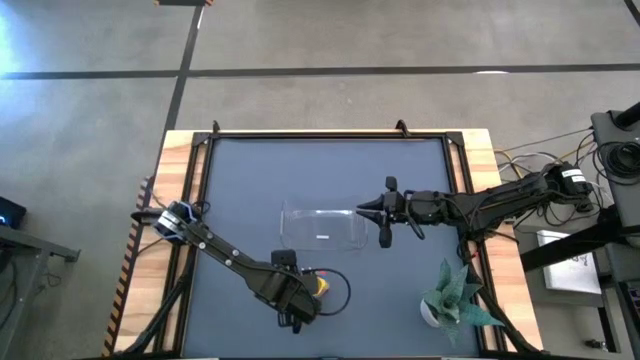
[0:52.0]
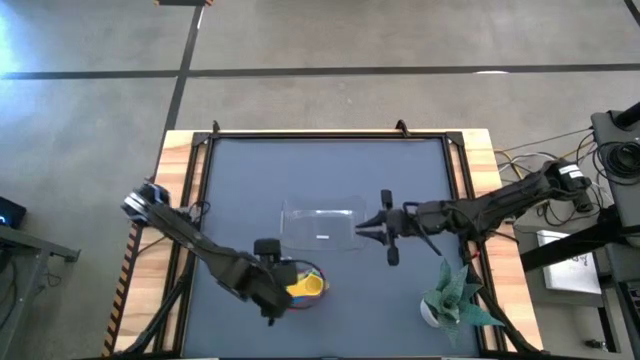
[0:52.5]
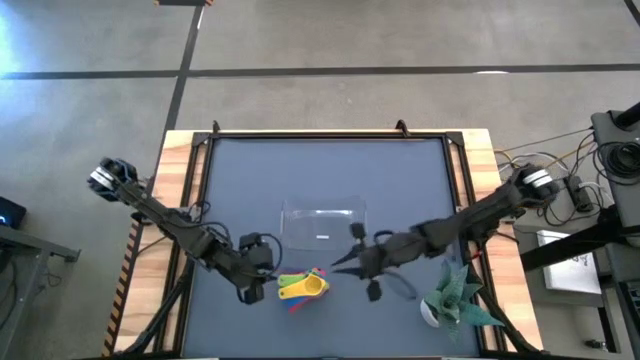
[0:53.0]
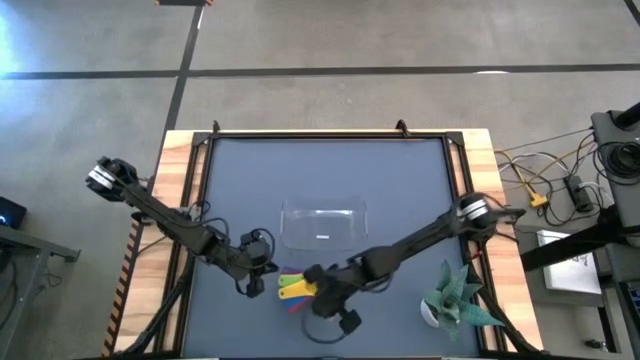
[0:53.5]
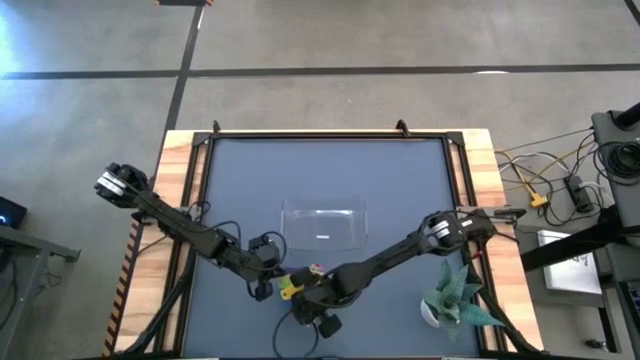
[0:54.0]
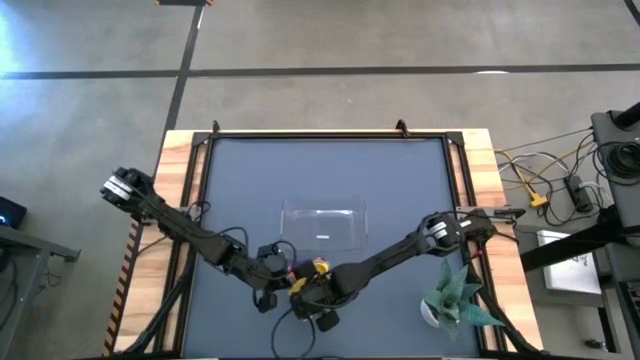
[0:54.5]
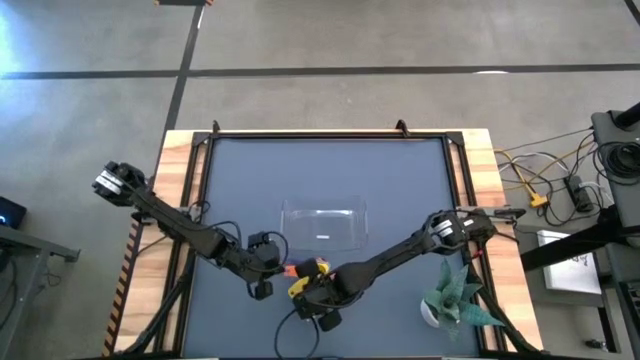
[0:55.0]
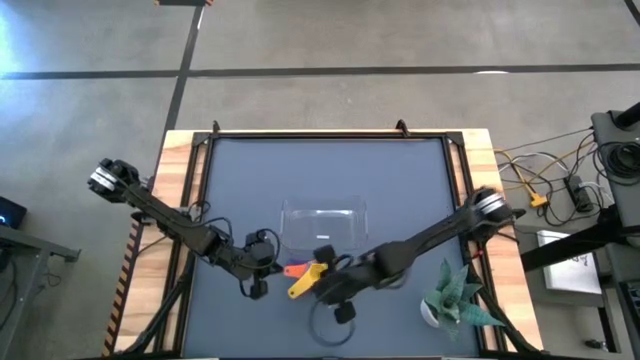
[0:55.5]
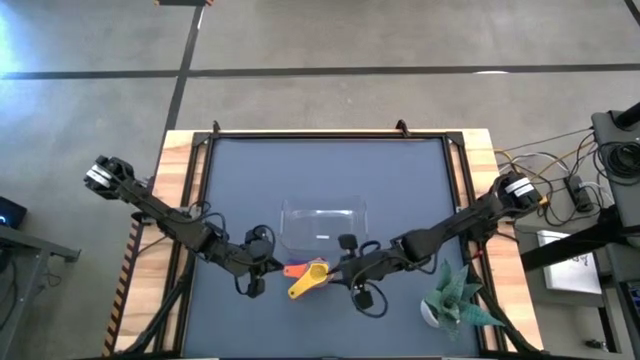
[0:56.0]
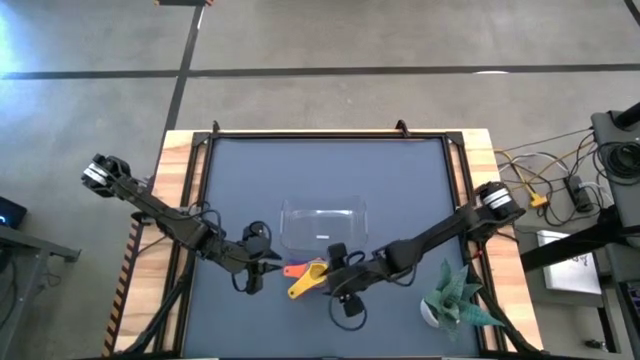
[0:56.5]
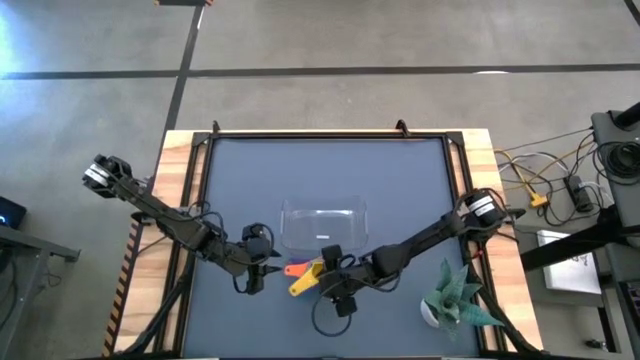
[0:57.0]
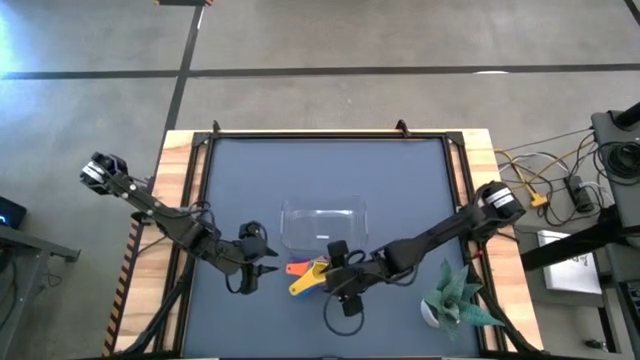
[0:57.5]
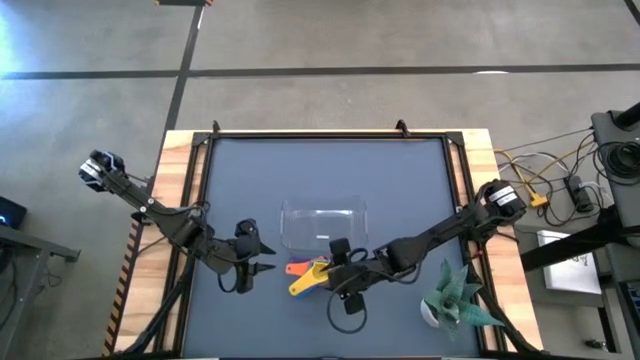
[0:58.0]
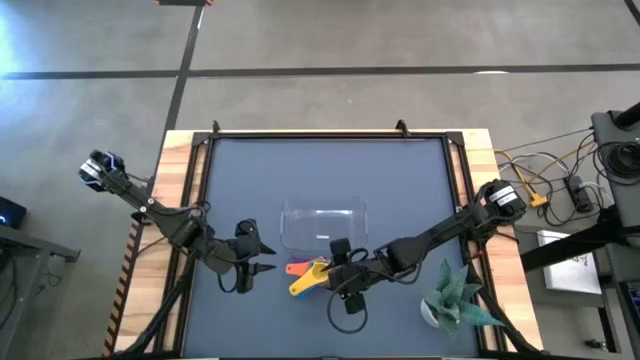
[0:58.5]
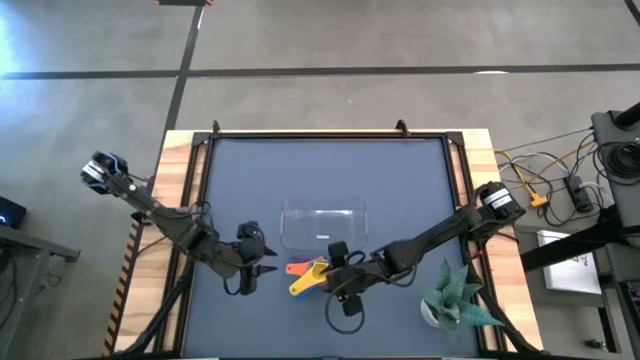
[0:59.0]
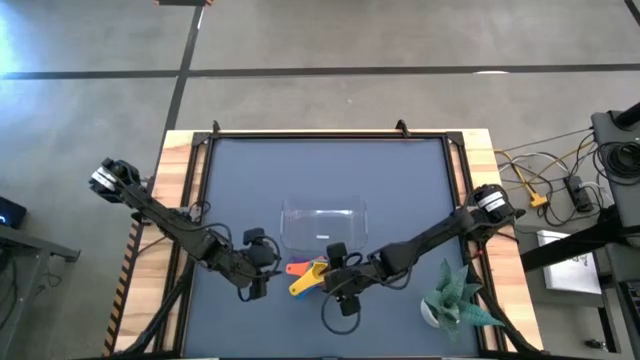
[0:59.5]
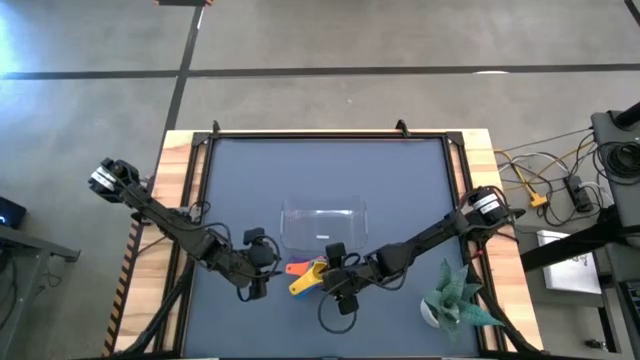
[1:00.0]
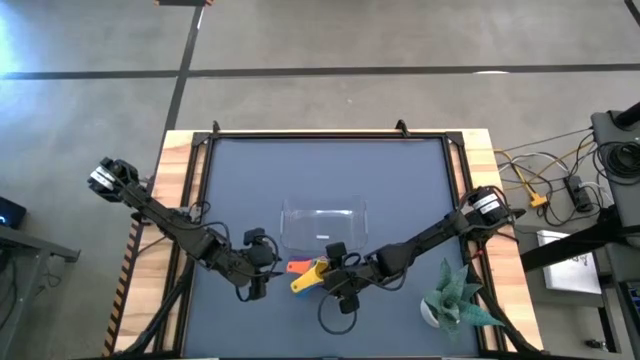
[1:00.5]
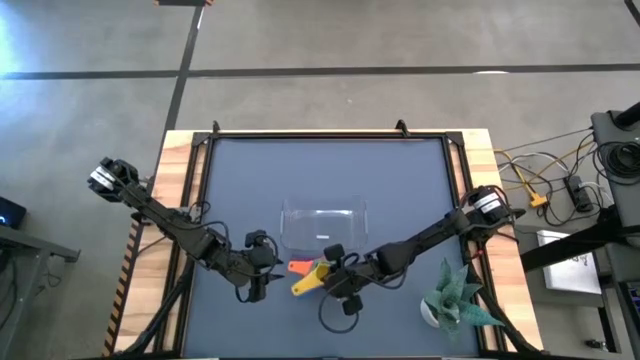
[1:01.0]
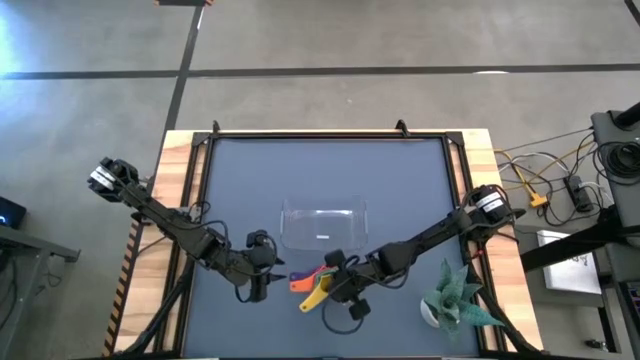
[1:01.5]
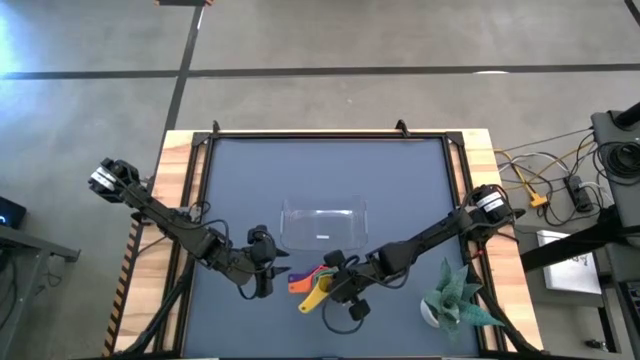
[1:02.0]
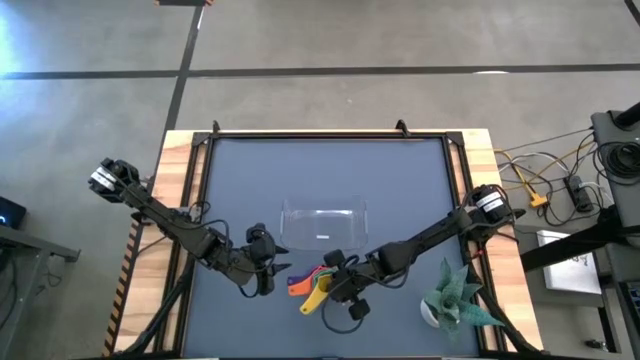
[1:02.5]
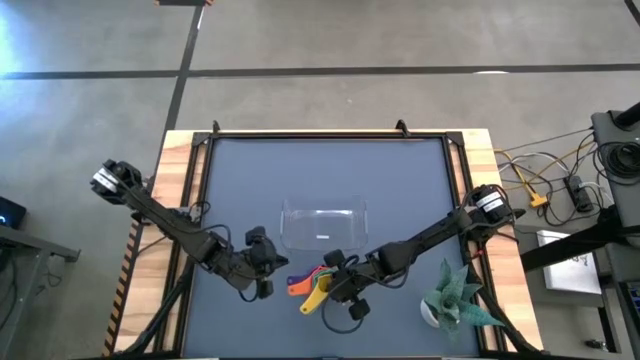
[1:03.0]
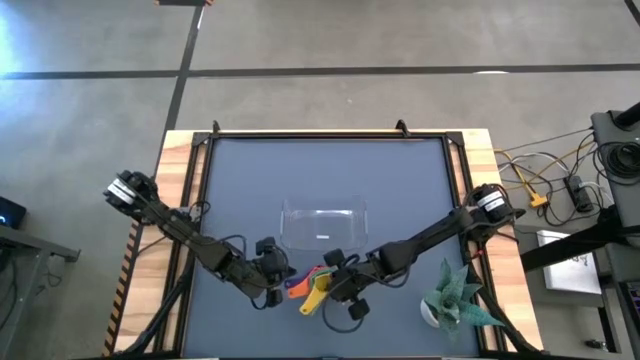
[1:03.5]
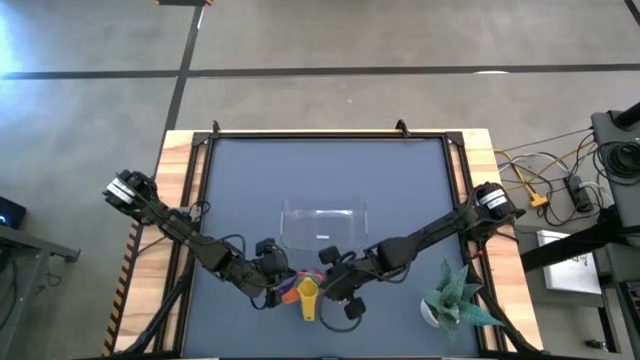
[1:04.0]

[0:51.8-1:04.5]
Task: Nest measuring cups in basket
Adjust the nested measuring cups

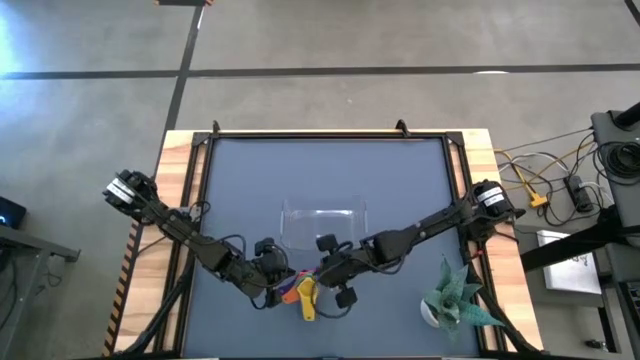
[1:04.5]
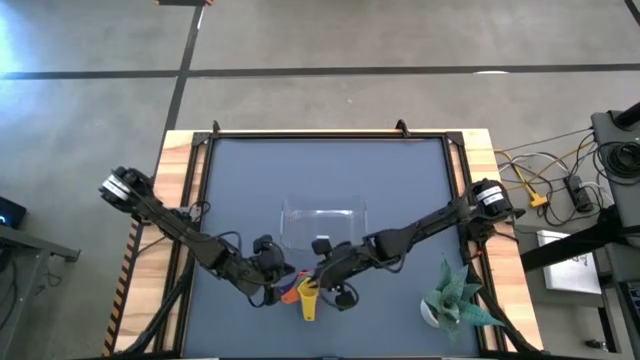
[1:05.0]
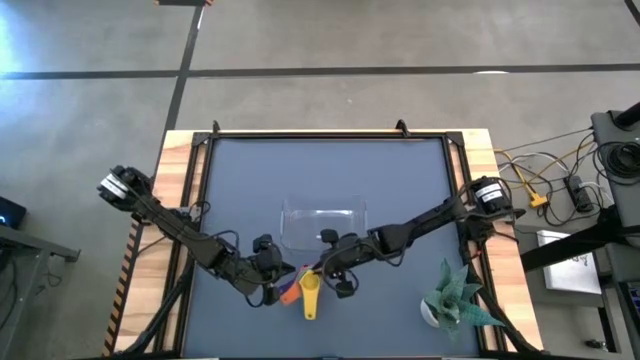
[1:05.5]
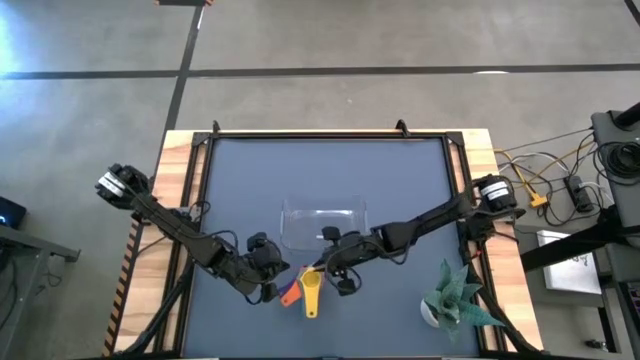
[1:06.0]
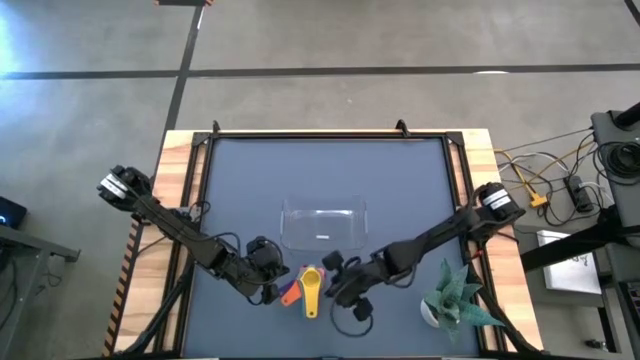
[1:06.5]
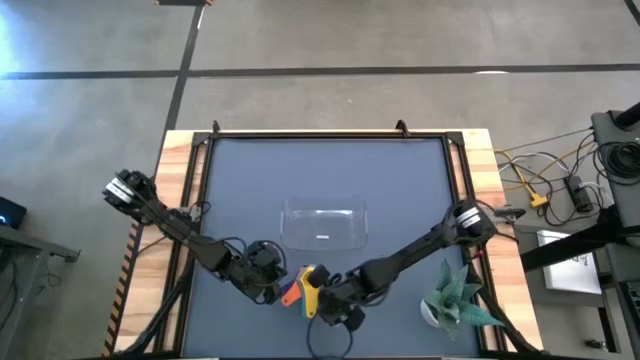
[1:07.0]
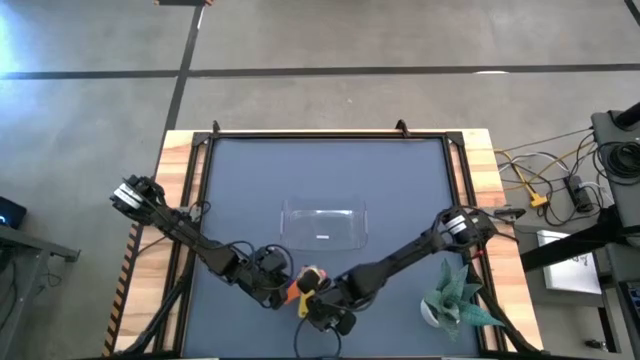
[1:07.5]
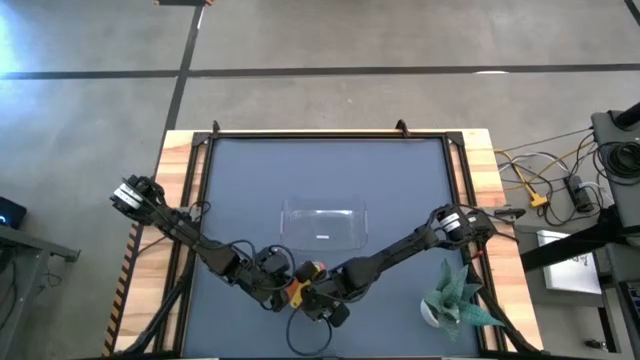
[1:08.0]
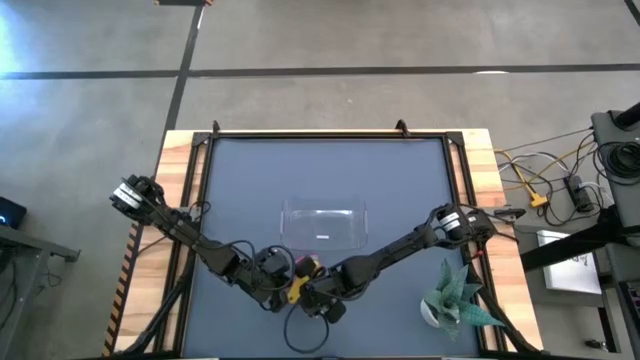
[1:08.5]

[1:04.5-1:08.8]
Adjust the nested measuring cups

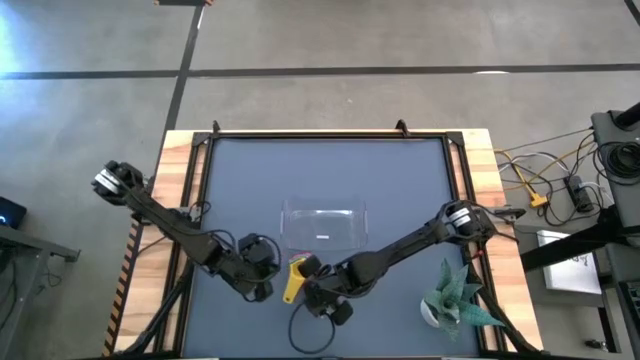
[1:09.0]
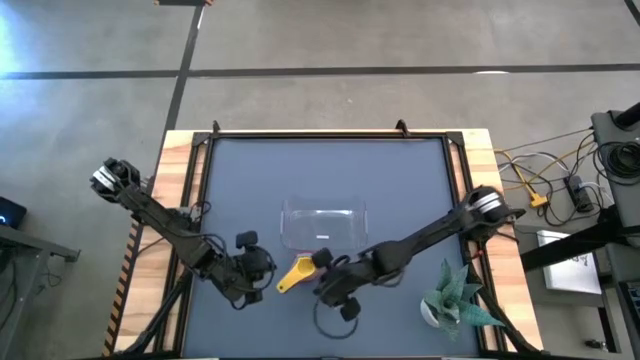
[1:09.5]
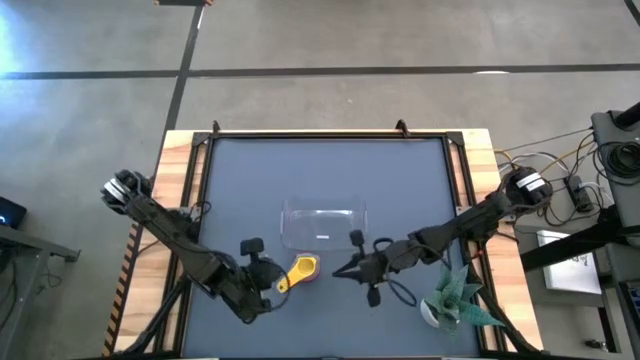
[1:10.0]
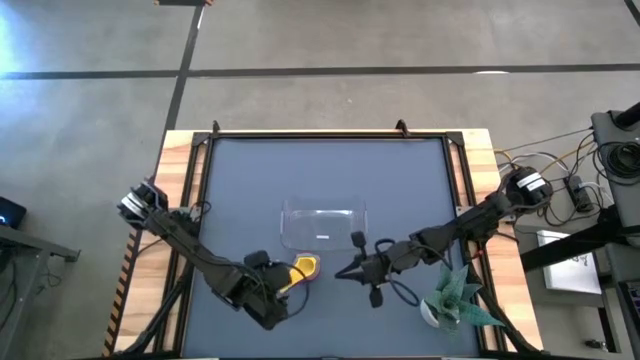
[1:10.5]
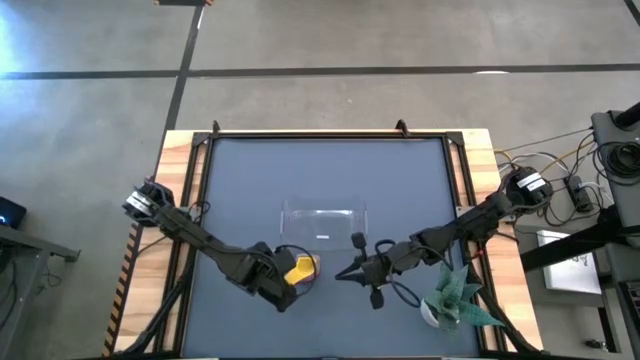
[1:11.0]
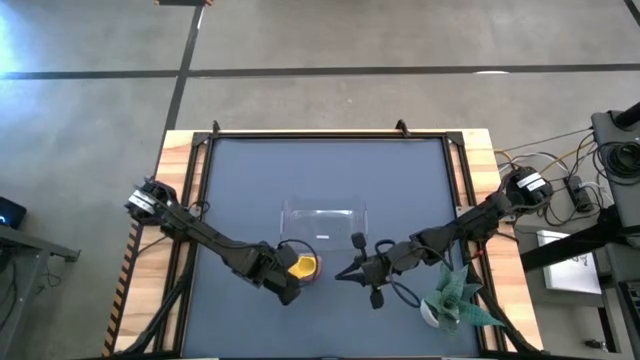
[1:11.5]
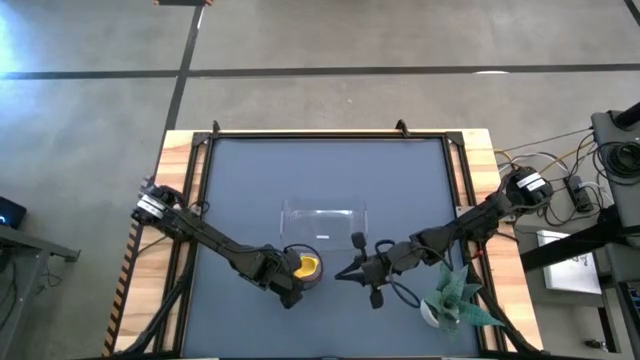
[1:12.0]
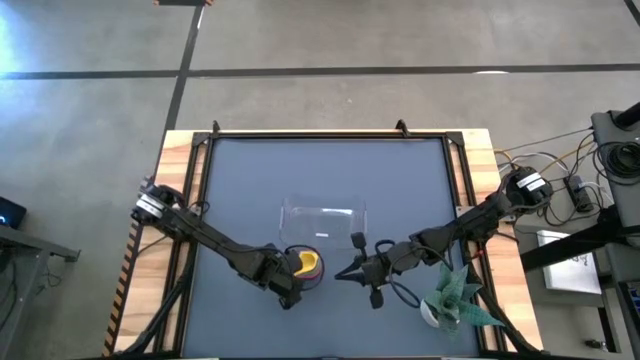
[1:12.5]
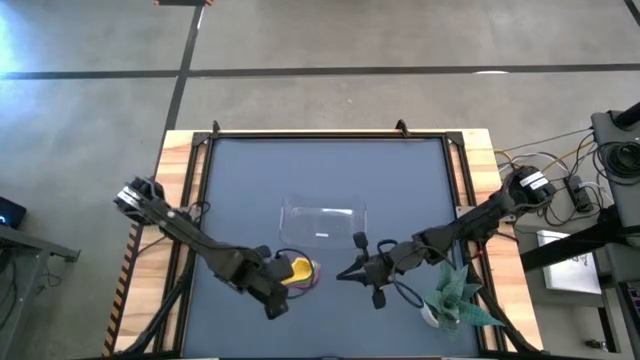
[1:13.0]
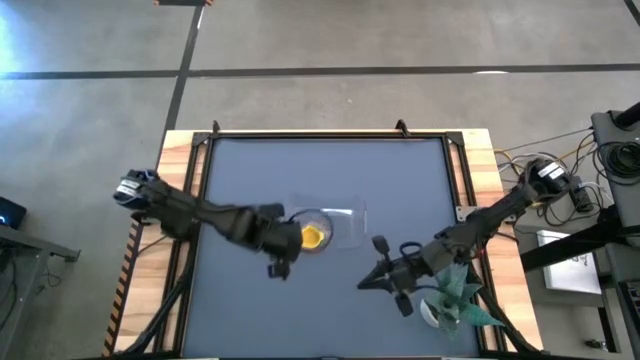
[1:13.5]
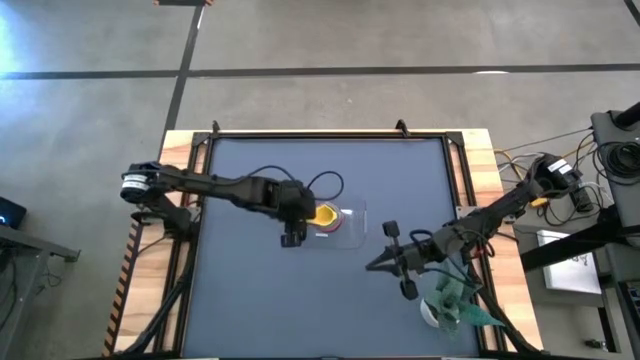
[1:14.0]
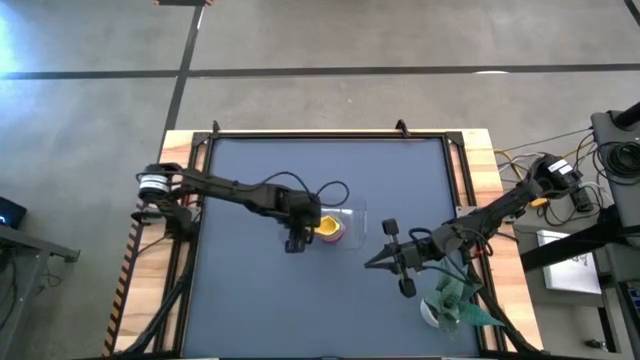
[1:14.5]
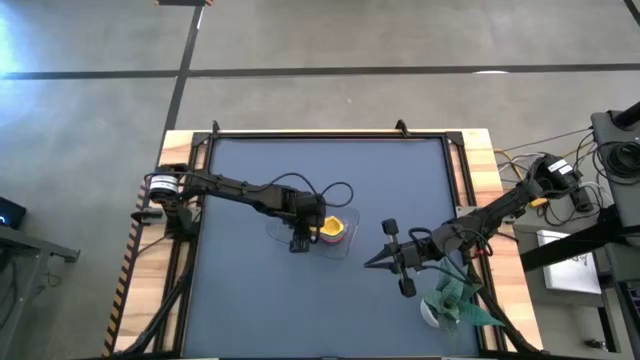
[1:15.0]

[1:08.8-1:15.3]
Put the nested measuring cups into the transparent bin
